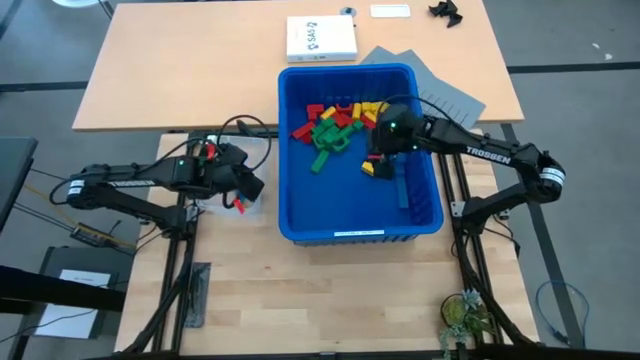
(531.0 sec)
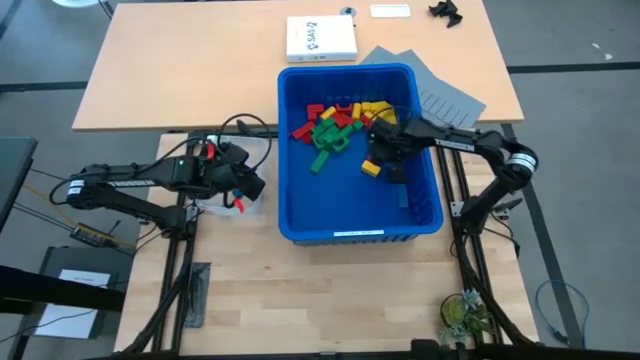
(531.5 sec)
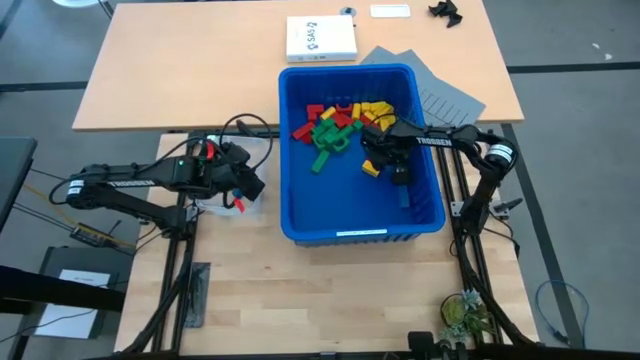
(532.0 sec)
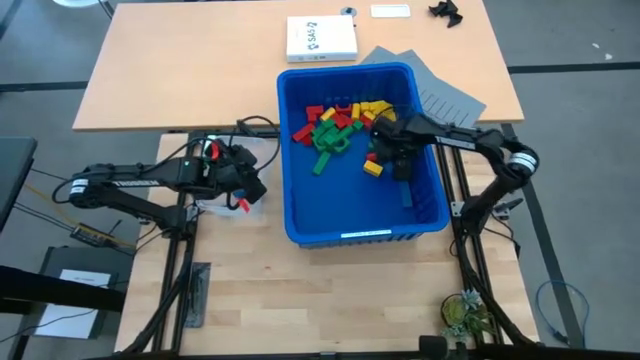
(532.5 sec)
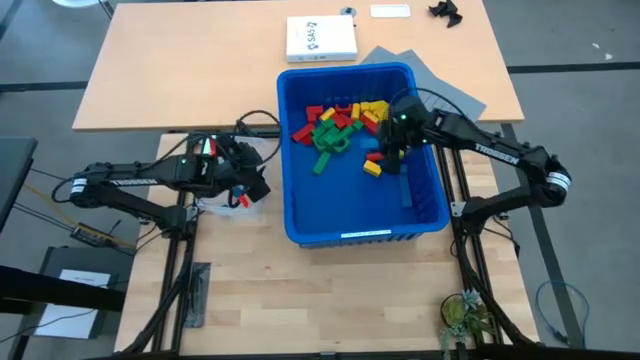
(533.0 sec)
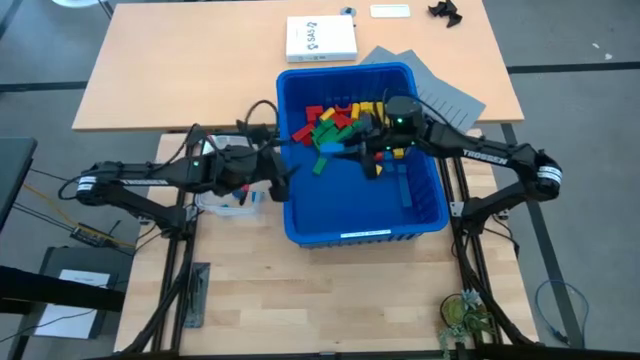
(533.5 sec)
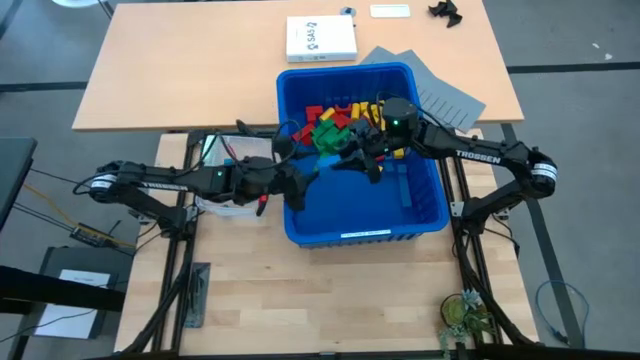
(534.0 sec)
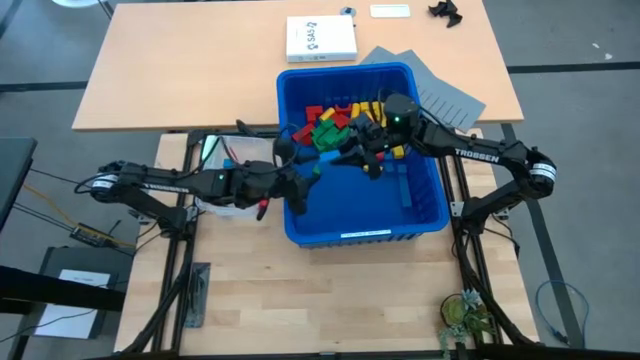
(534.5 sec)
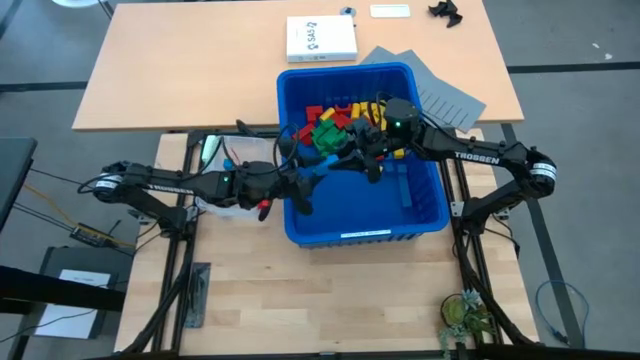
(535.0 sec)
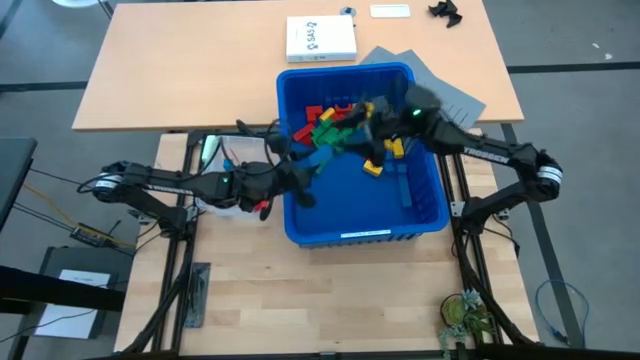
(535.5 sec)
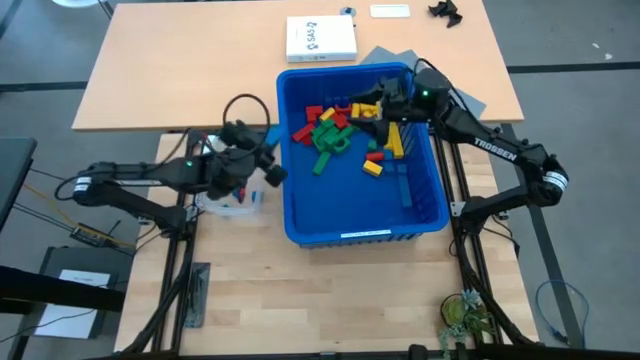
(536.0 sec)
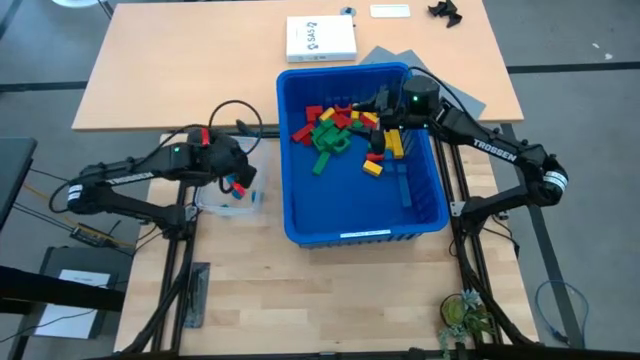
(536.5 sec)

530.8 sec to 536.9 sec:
Task: Sort blocks
Put the blue block into the transparent bin

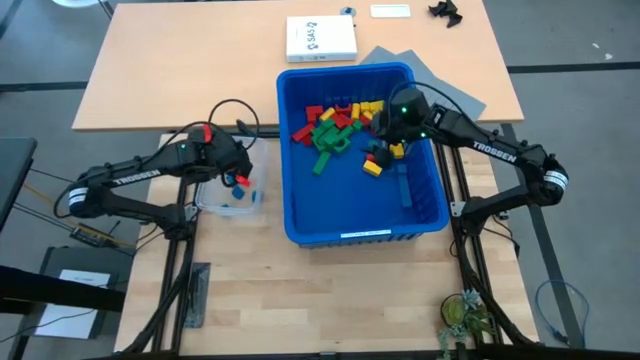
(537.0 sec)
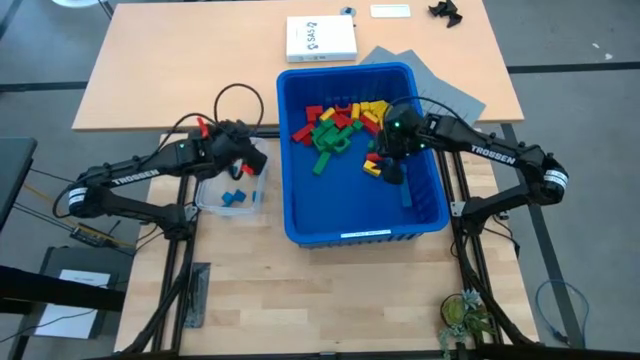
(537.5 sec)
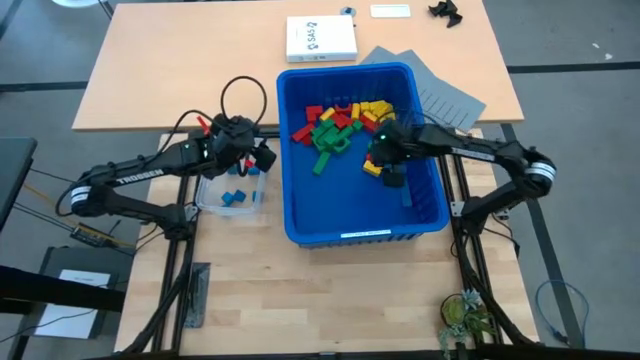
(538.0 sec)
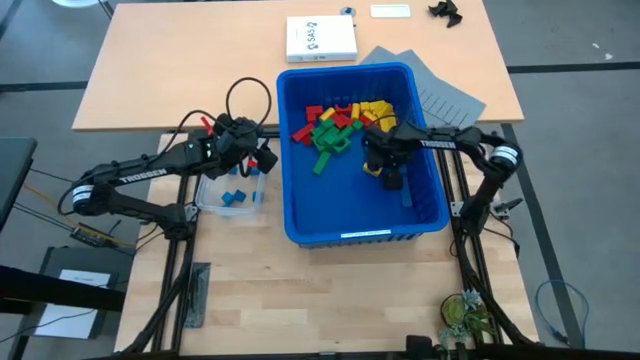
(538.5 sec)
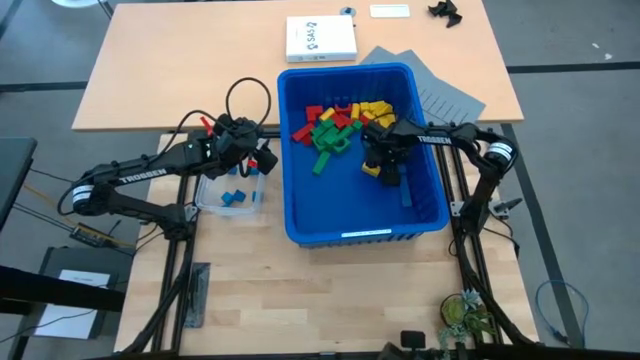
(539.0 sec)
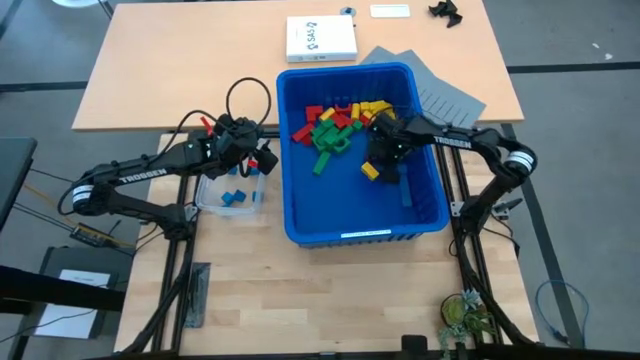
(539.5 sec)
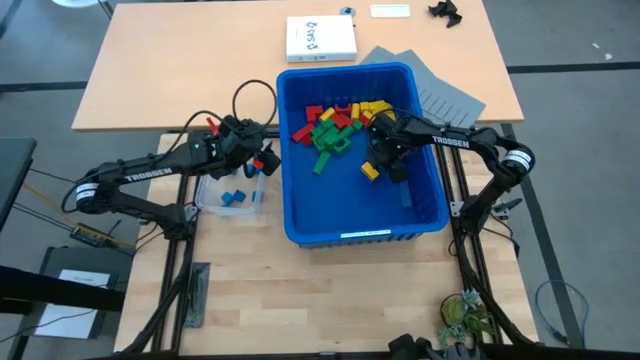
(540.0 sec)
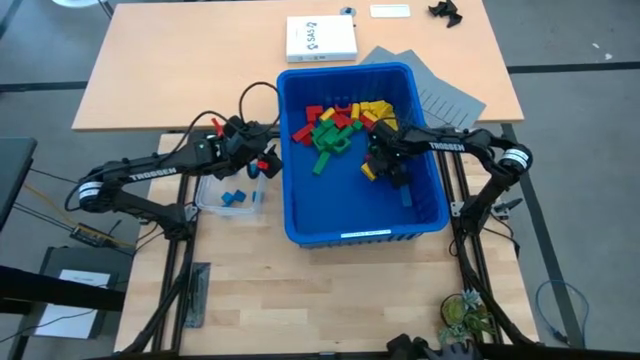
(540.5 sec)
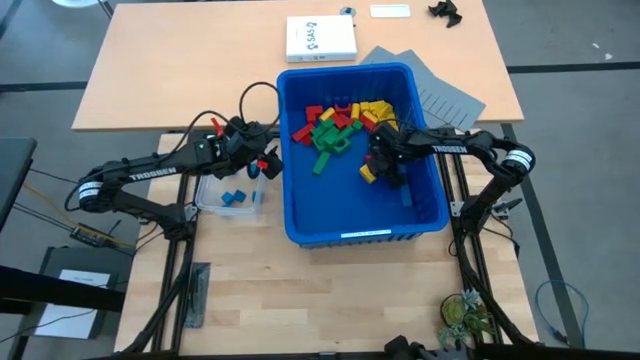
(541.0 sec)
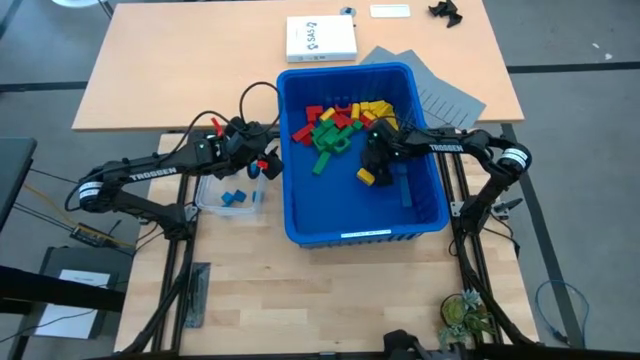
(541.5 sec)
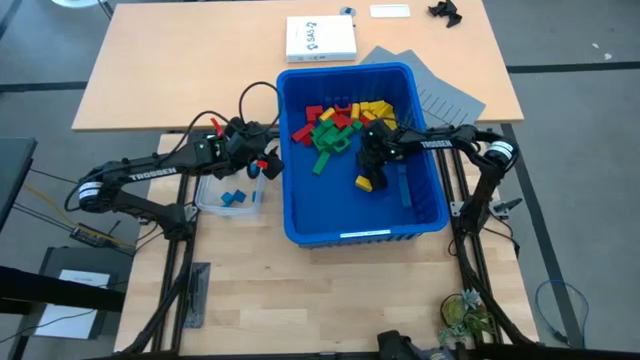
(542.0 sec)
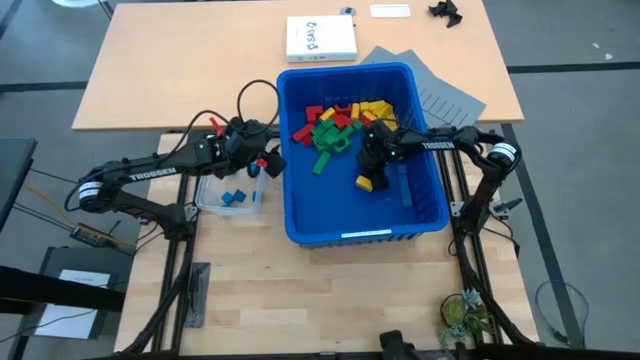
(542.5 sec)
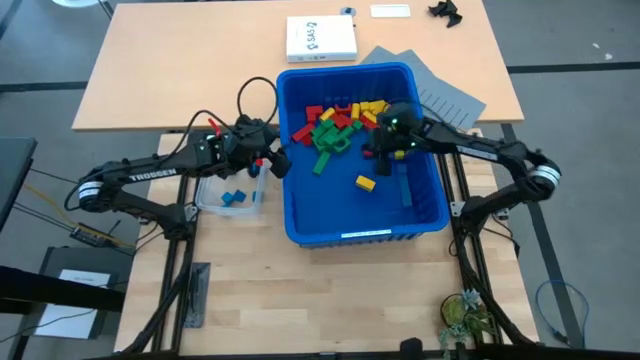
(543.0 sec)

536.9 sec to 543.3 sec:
Put the blue block into the transparent bin

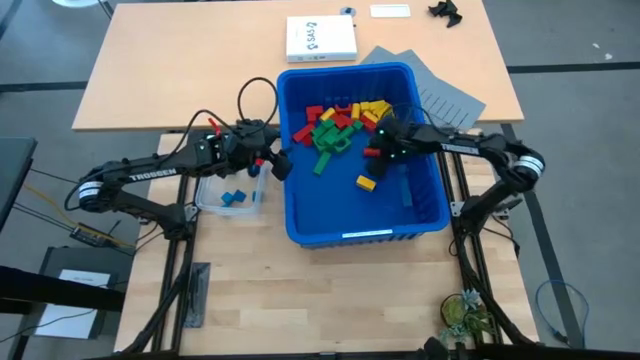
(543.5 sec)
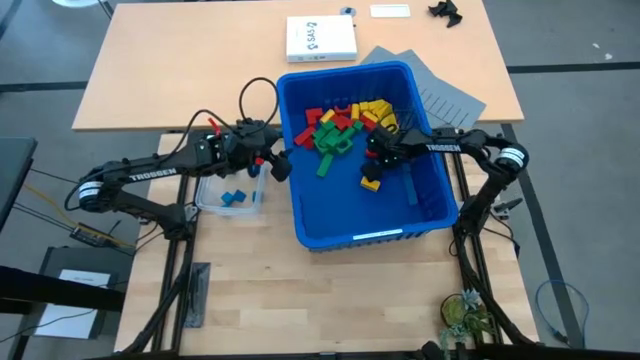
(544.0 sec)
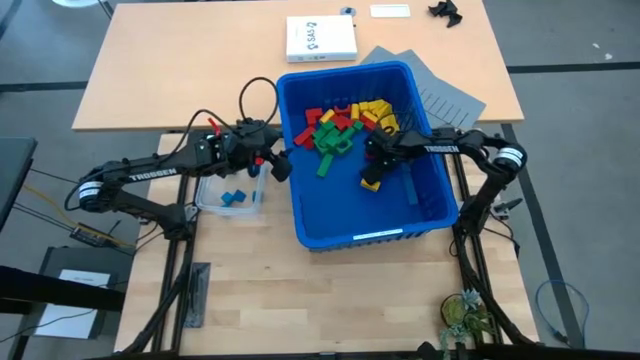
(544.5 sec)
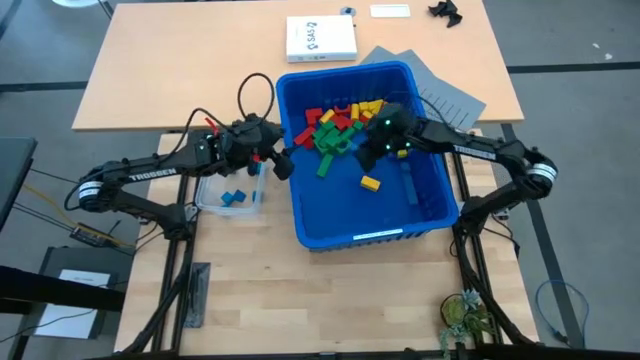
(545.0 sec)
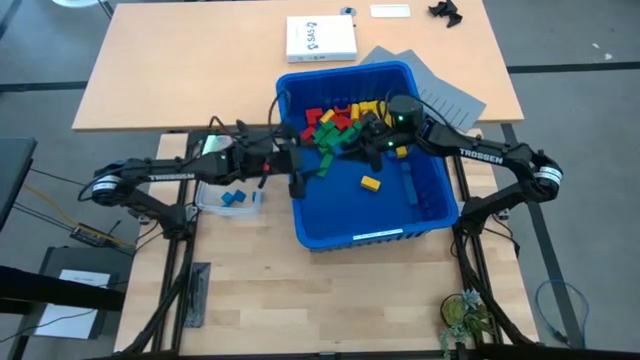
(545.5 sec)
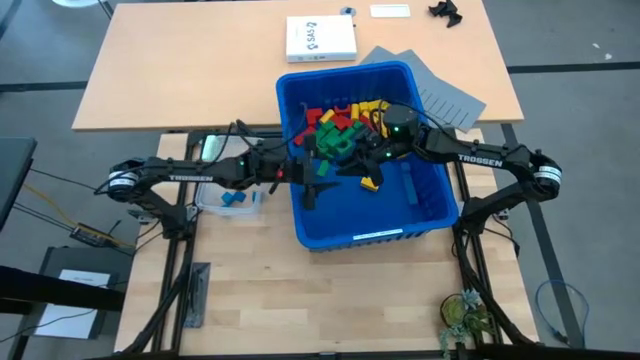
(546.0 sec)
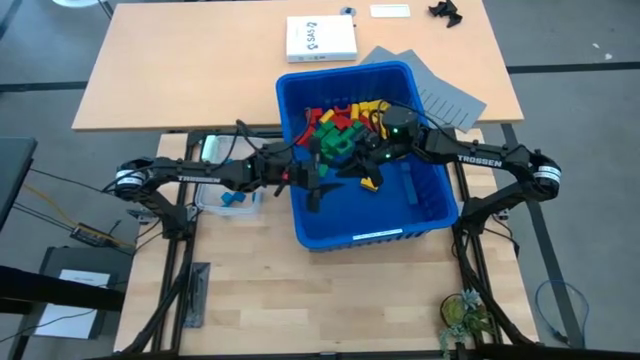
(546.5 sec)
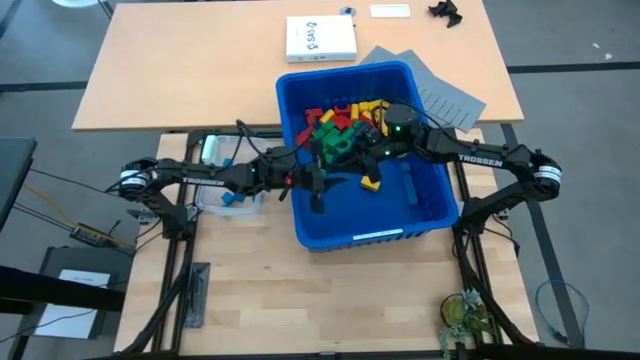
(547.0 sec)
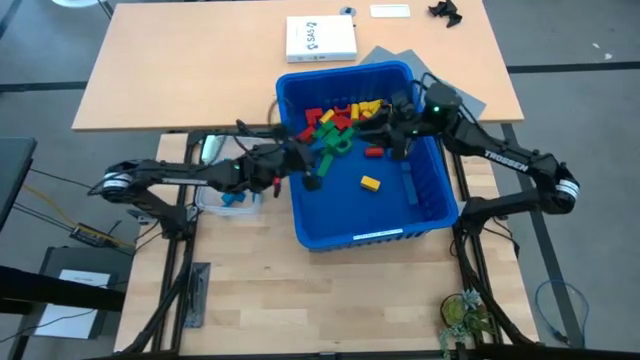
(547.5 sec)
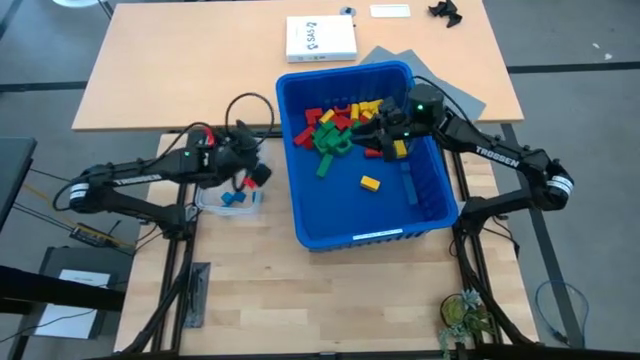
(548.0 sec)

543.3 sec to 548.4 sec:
Put the blue block into the transparent bin

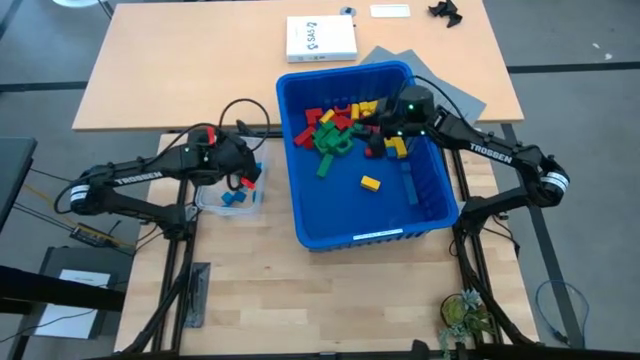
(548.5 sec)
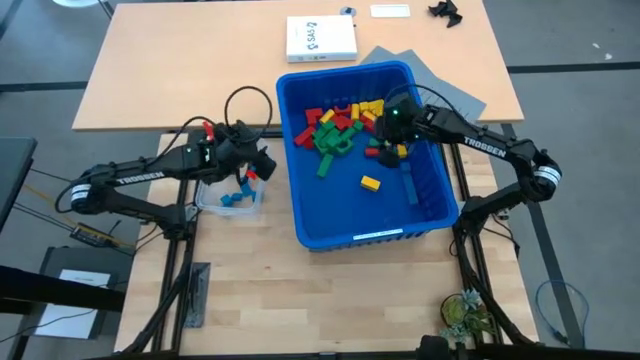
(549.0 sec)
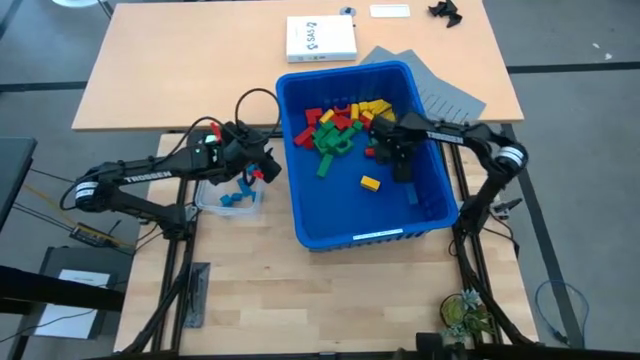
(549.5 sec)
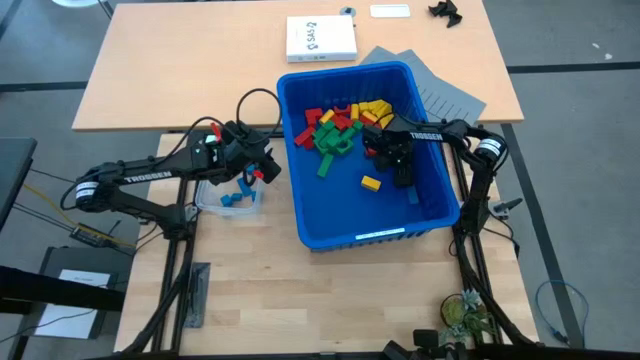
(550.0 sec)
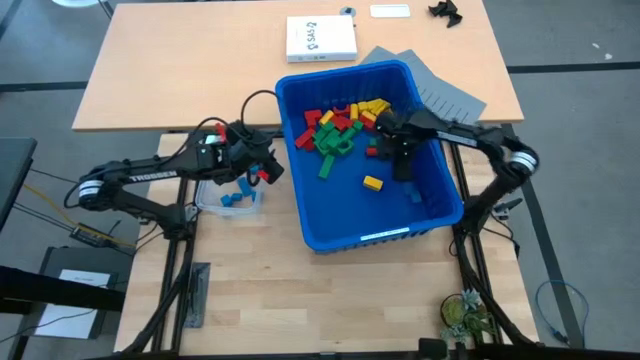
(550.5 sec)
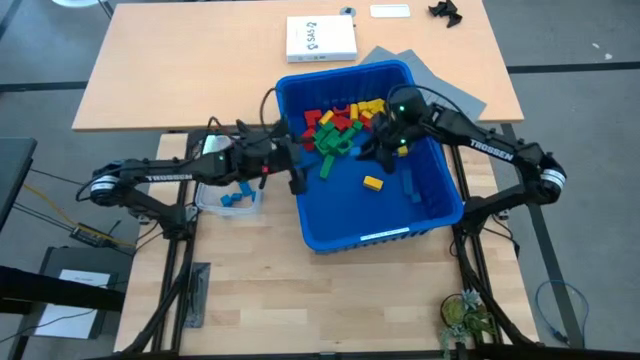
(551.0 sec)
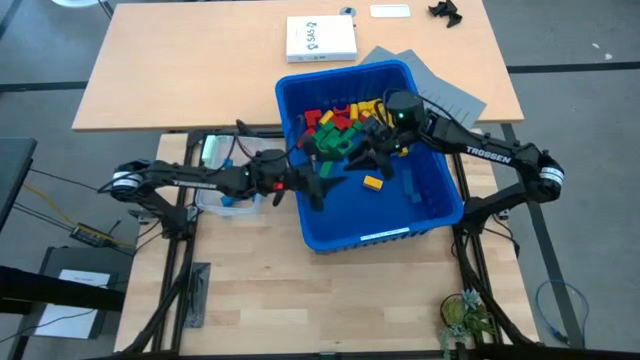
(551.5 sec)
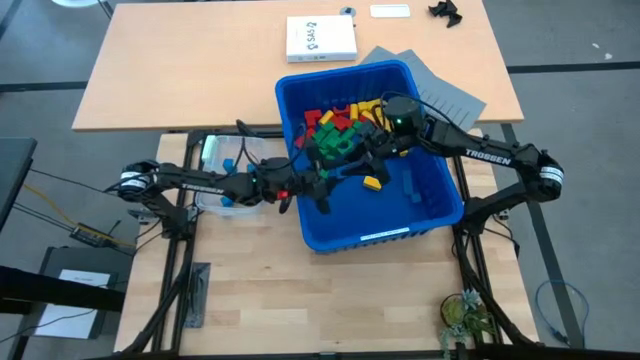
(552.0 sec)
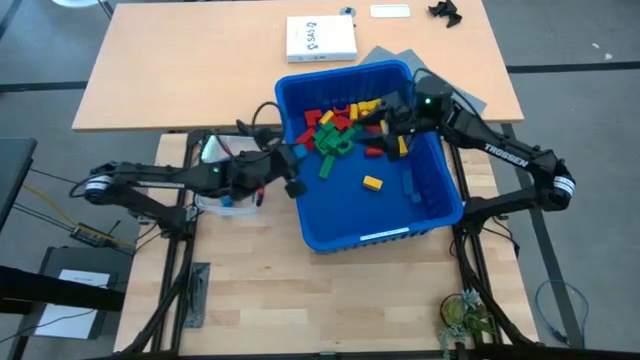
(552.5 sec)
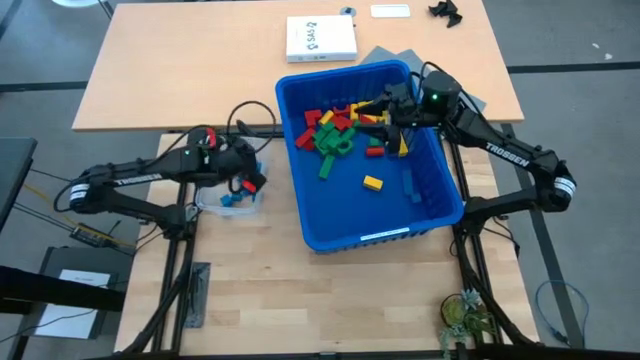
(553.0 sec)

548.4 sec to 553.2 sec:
Put the blue block into the transparent bin
